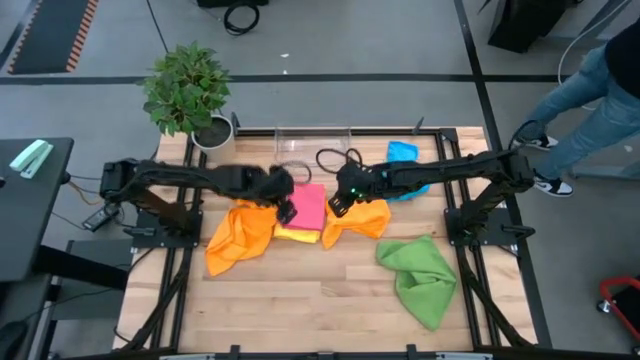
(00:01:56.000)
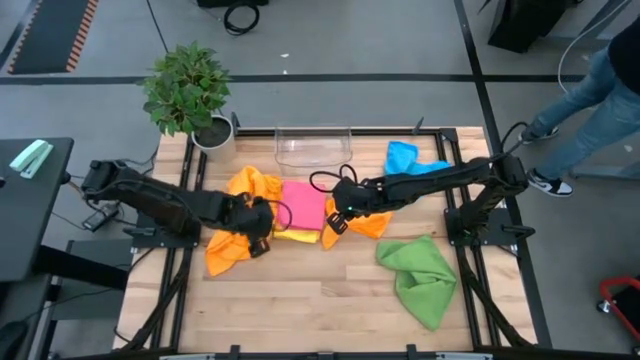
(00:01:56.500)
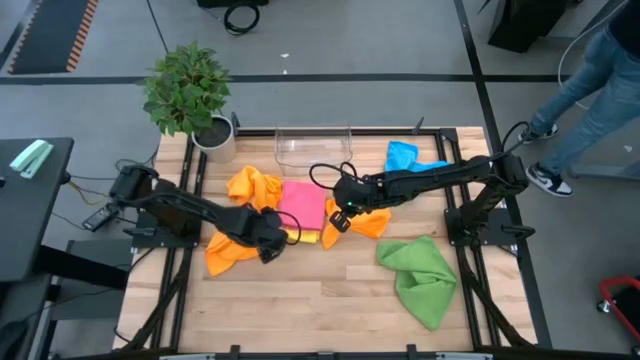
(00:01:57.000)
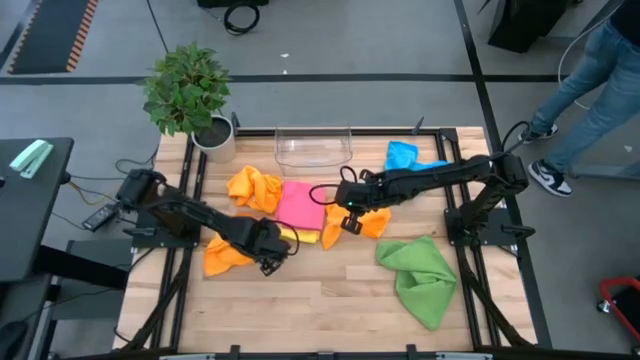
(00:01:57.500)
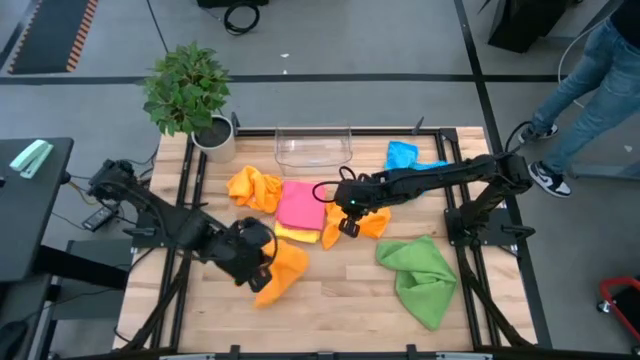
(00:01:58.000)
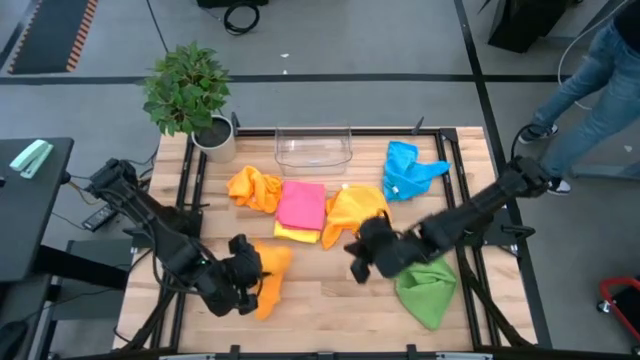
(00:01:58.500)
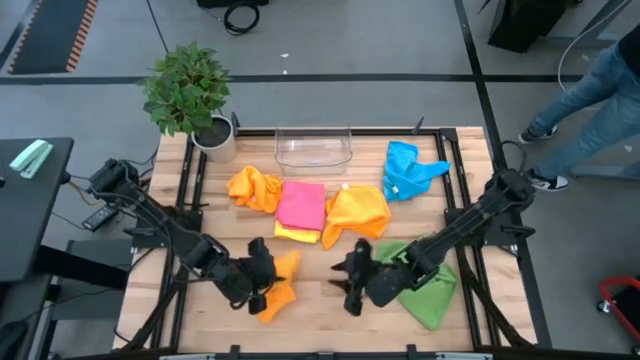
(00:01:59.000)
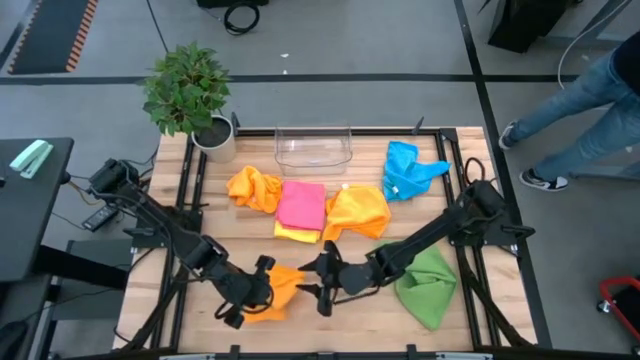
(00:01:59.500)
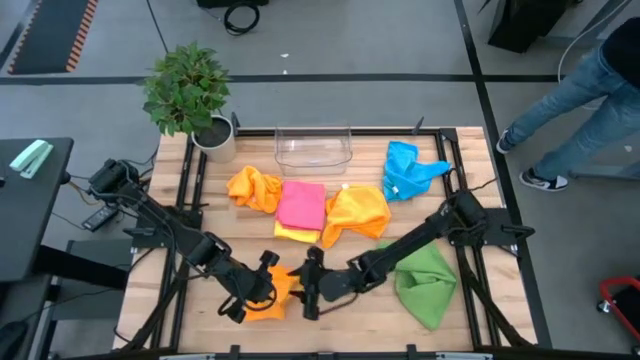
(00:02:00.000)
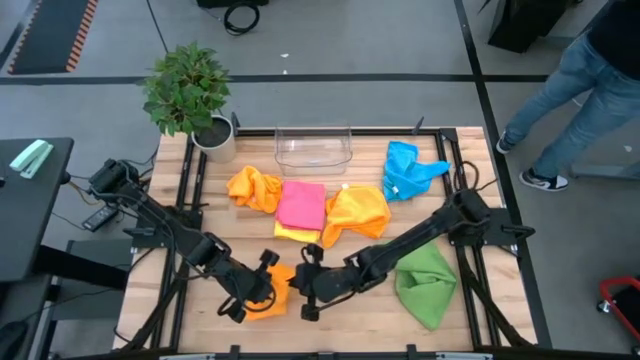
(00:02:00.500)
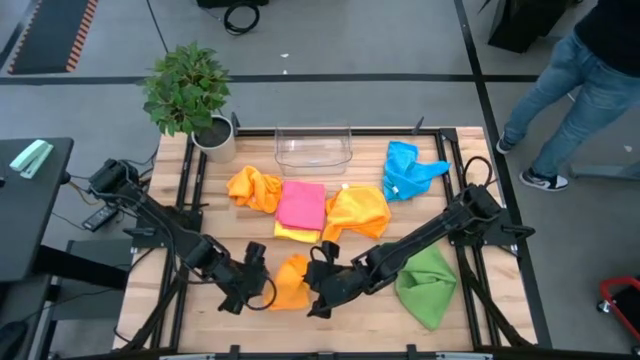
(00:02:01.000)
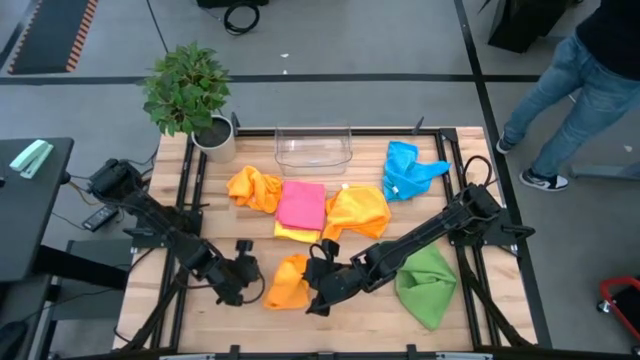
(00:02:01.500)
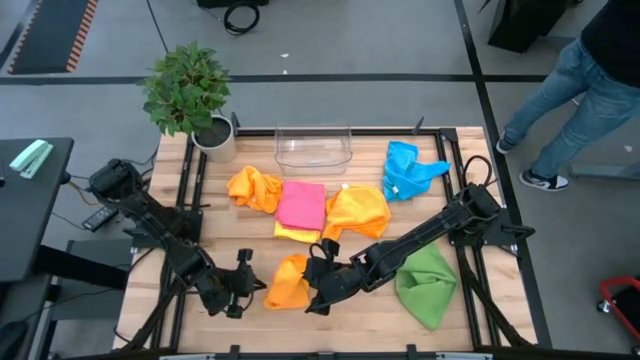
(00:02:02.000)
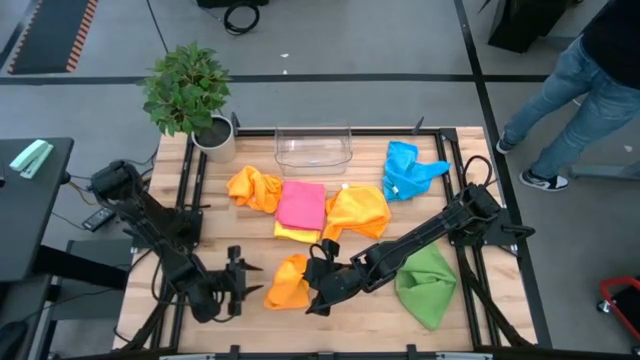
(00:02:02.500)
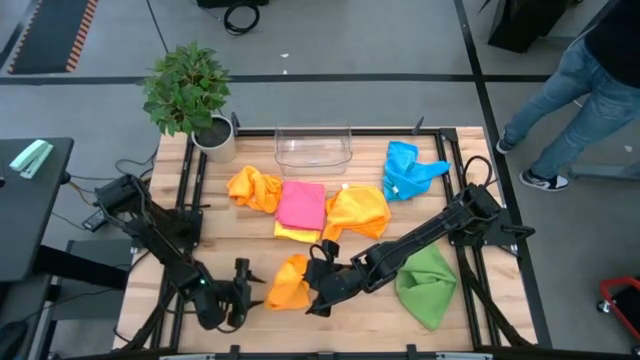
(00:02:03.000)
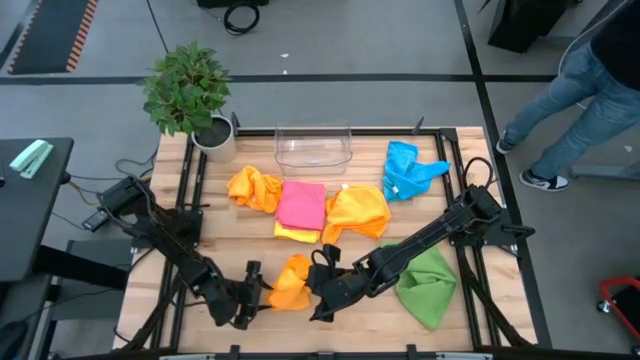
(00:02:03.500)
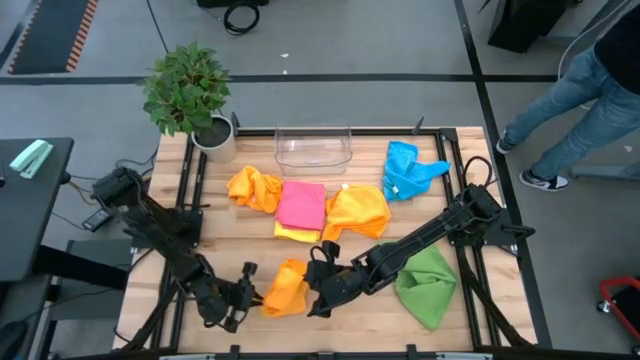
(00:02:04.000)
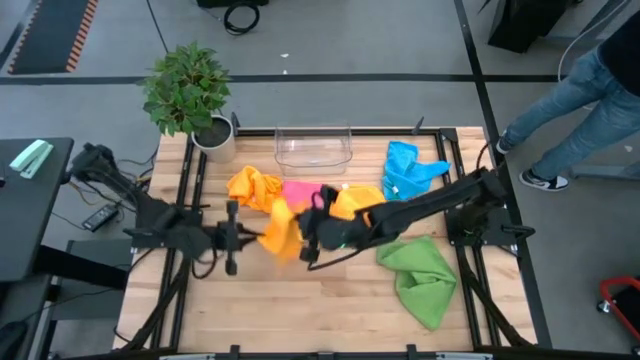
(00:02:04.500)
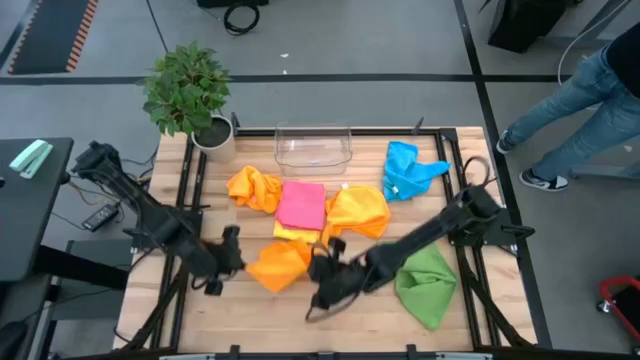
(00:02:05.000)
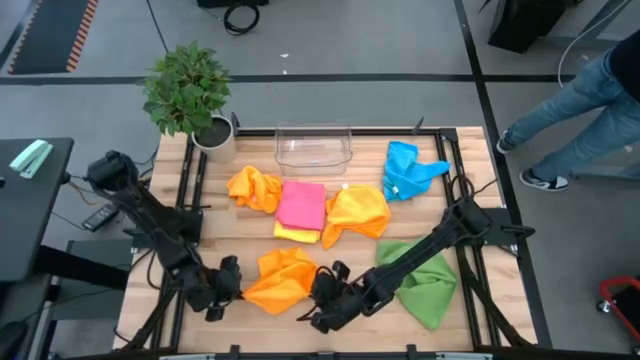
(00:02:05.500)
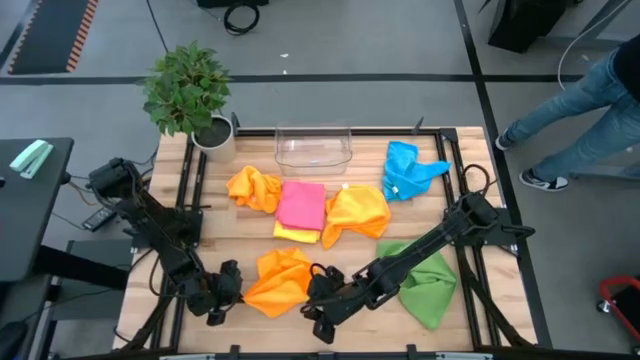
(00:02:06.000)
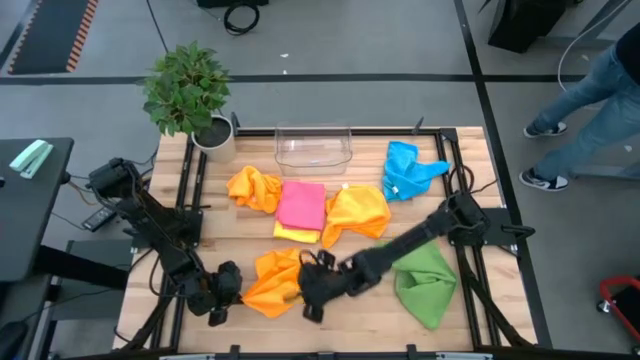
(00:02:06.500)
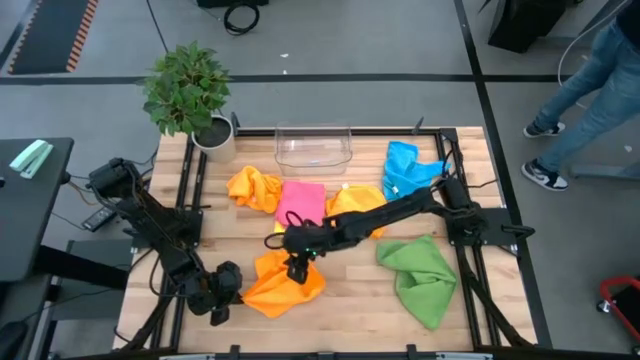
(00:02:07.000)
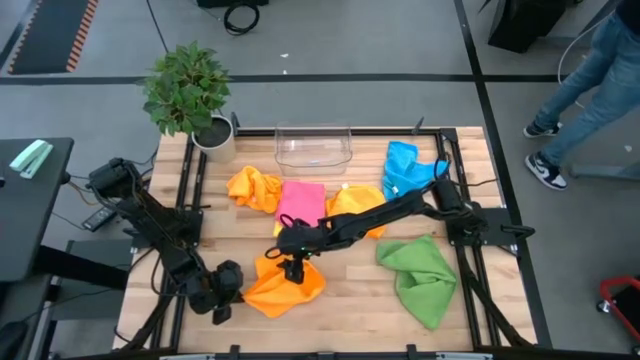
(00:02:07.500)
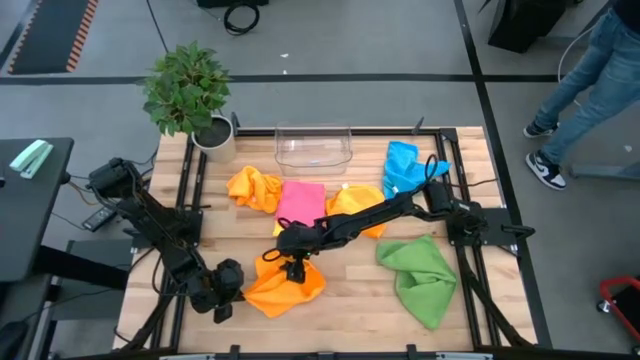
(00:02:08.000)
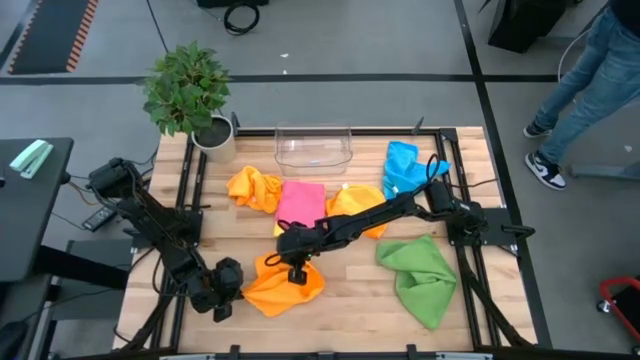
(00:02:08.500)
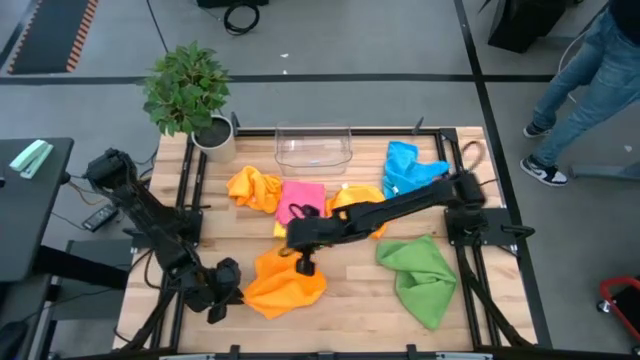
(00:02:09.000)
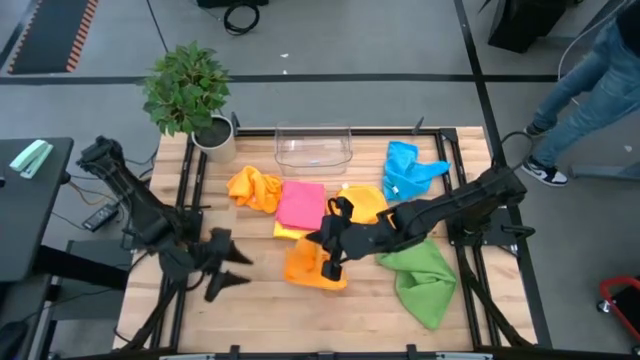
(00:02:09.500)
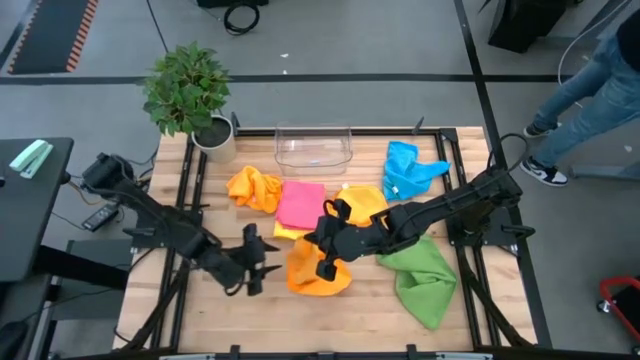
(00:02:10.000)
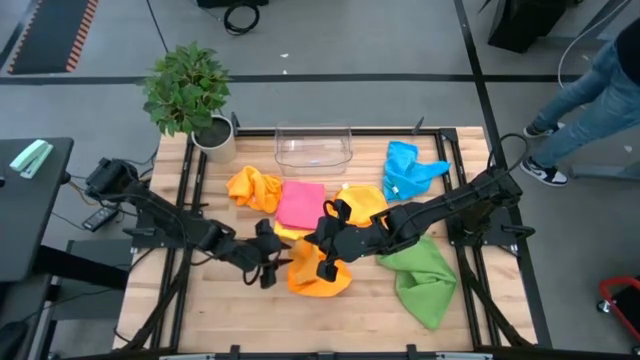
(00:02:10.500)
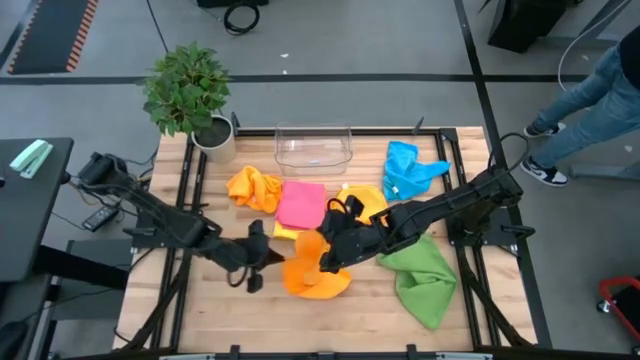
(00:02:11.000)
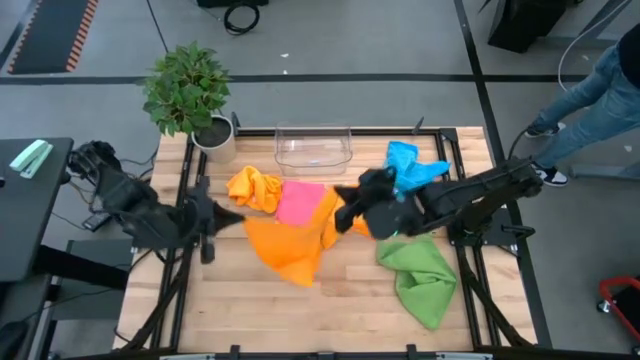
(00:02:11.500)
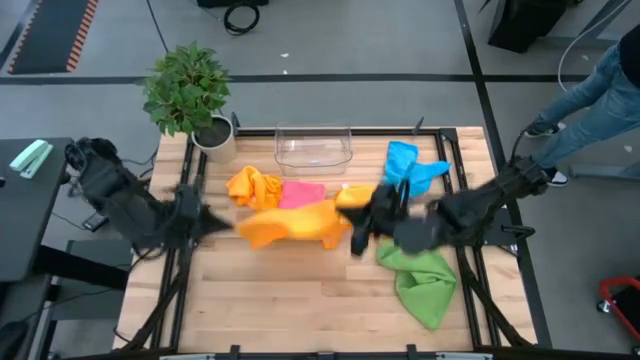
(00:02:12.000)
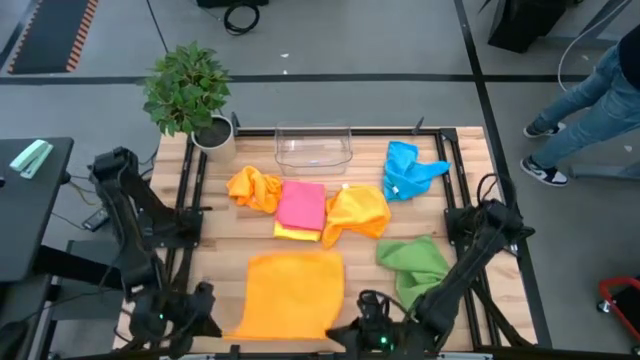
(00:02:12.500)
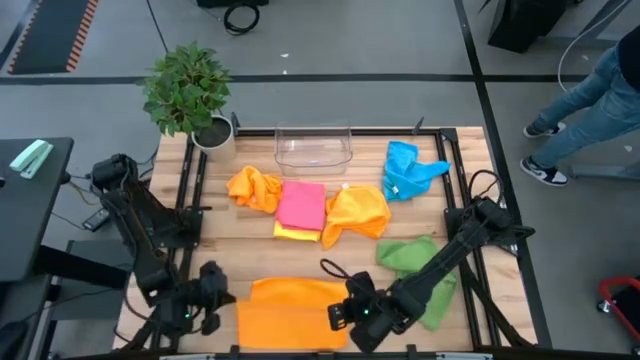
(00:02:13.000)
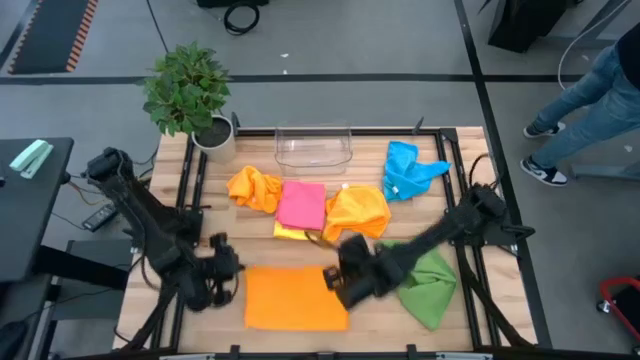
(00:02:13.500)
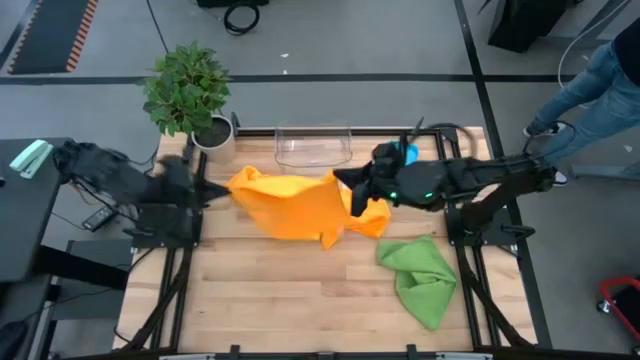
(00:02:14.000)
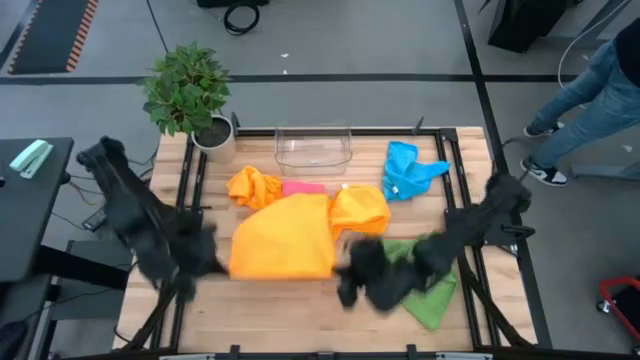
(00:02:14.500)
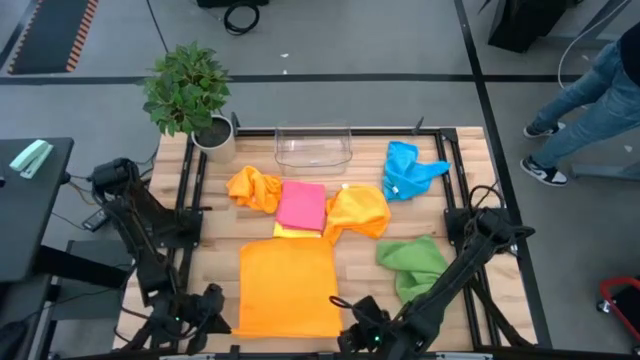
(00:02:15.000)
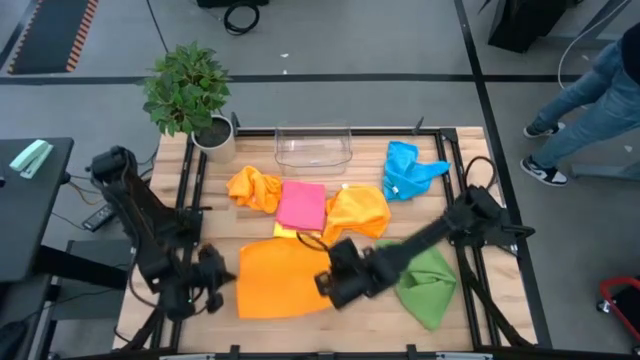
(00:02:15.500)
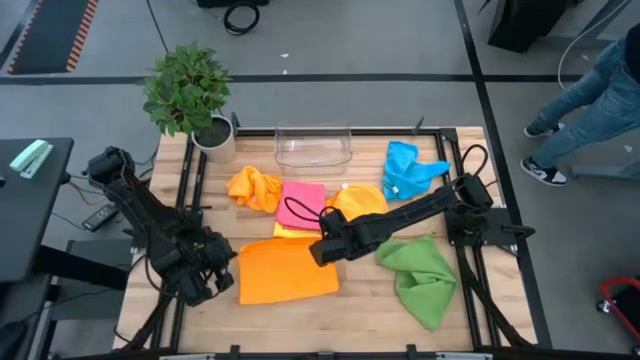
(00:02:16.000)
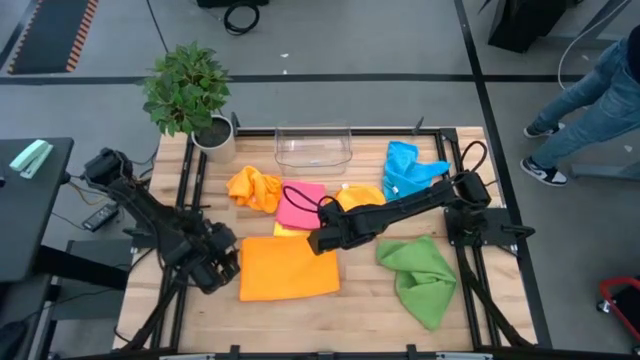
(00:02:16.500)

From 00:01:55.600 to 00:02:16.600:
Task: Fold microfiber towels
Fold the bottom orange microfiber cloth
